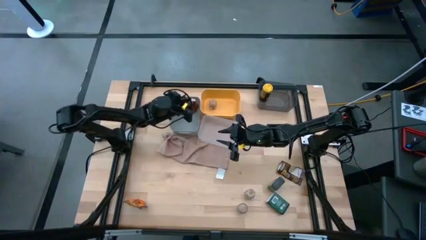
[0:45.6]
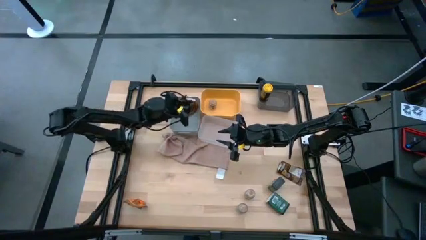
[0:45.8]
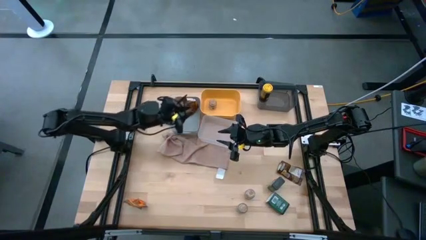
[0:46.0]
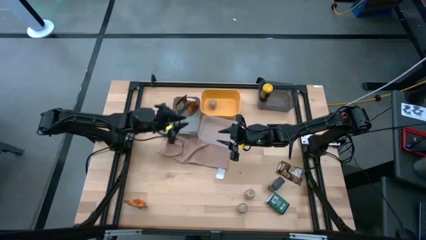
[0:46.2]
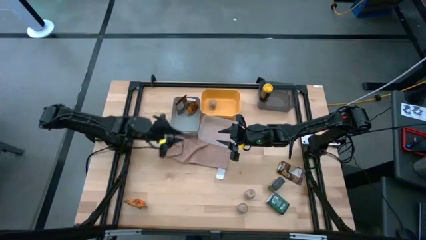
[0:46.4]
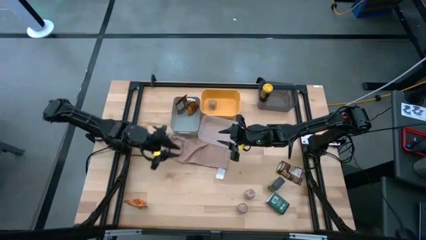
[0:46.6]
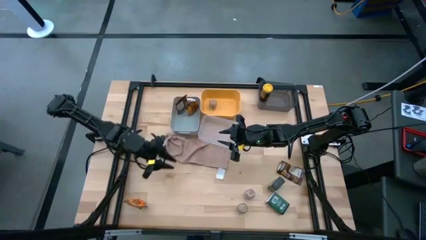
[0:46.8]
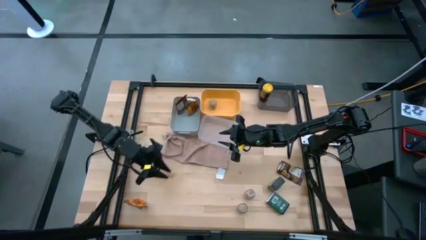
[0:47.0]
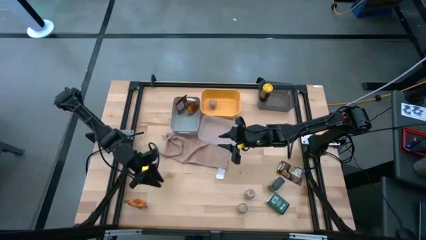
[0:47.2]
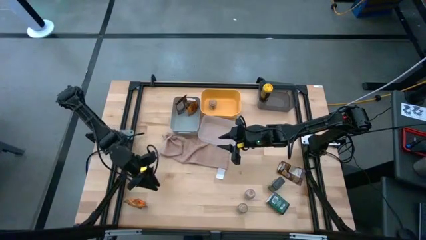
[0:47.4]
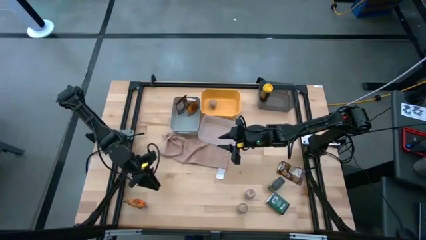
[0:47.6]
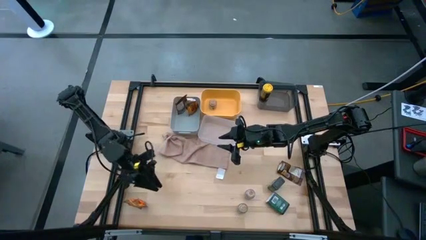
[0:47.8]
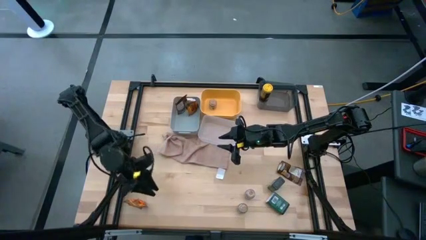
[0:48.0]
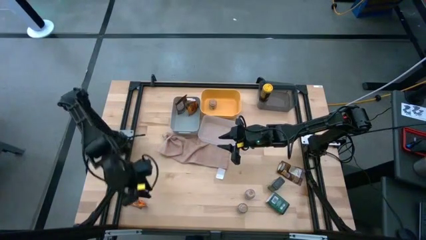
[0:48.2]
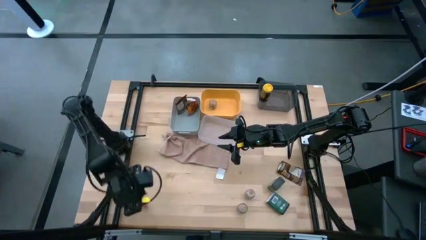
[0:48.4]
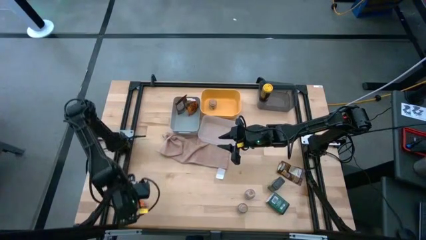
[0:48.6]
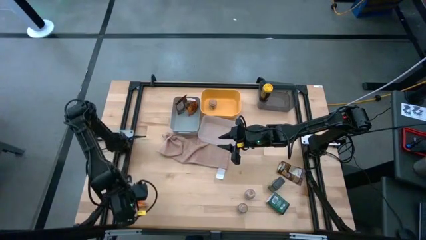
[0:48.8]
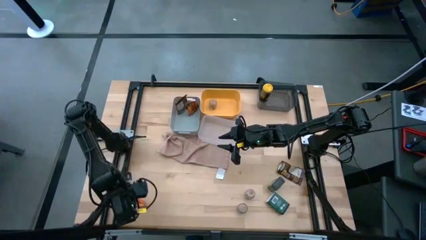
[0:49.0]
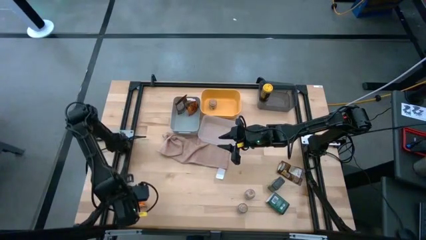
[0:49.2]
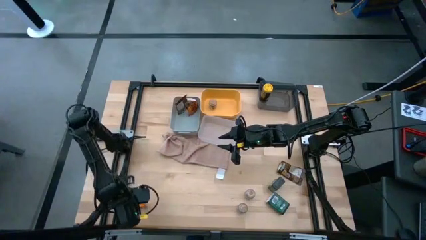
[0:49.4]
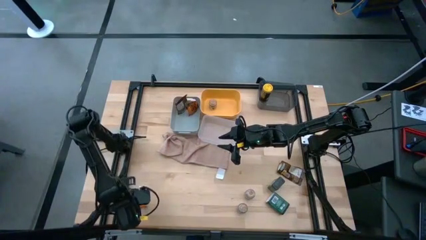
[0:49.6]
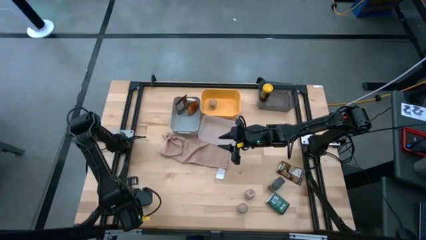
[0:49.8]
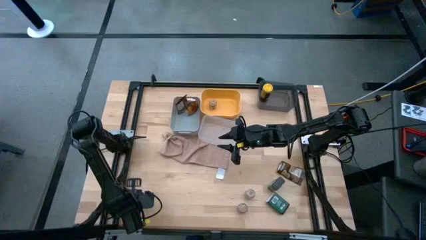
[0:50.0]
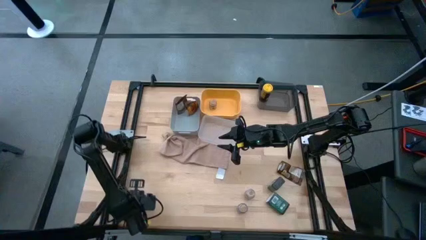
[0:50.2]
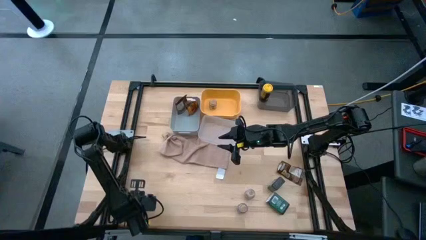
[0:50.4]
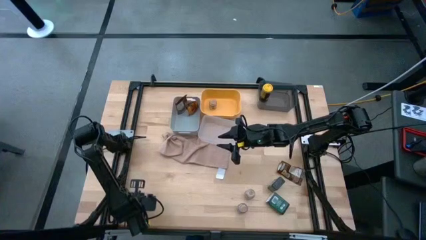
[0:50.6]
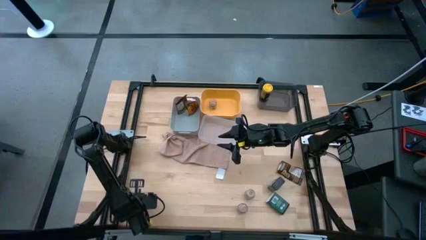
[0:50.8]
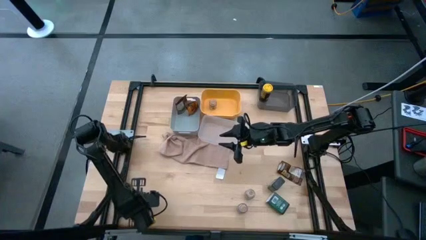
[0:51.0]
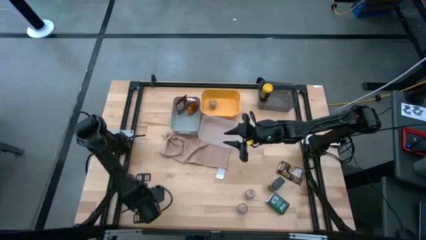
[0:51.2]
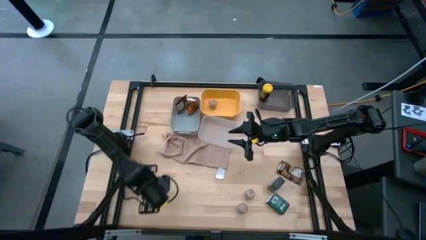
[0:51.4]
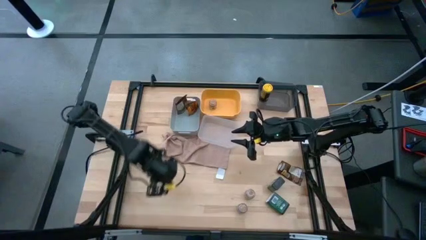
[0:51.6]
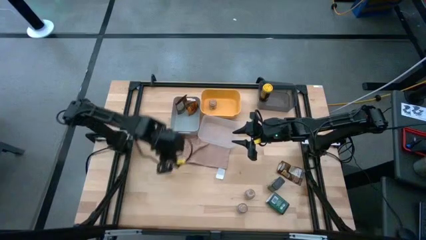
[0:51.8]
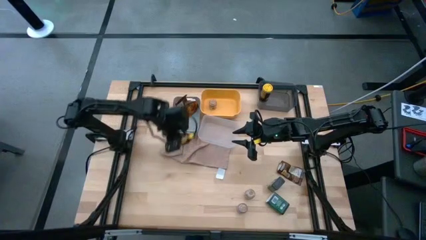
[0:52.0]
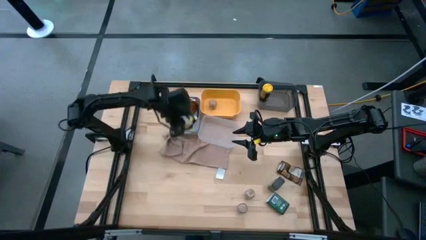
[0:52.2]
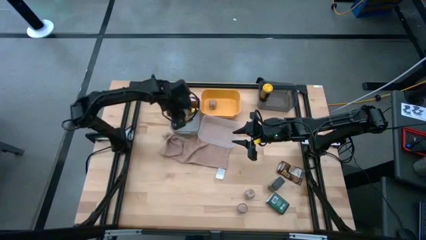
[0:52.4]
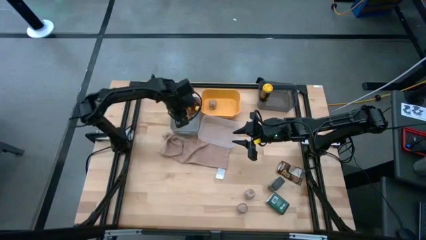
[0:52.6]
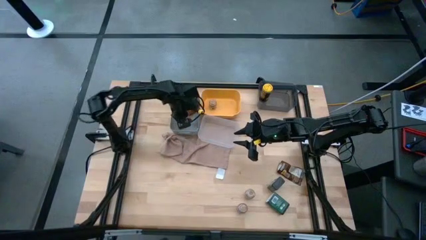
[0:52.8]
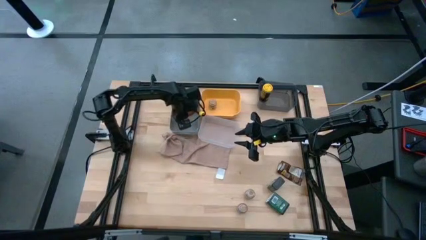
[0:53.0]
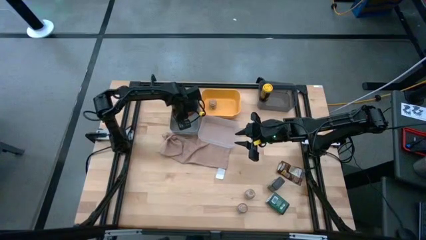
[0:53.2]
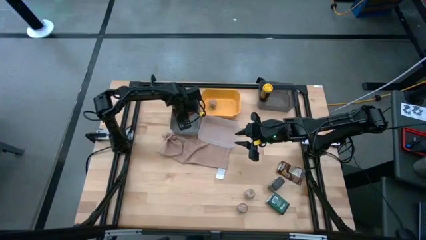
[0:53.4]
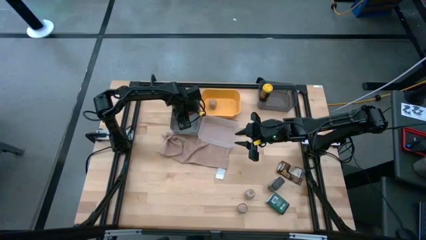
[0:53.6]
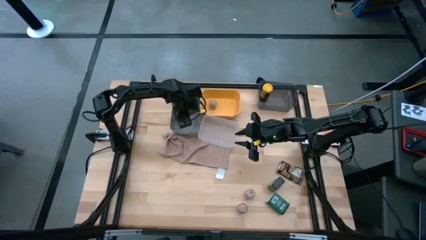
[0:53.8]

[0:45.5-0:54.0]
Task: Sort spices by type
Put the bottom orange seasoning pack into the gray bin

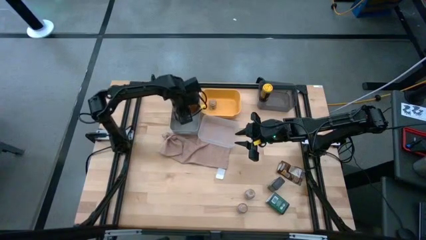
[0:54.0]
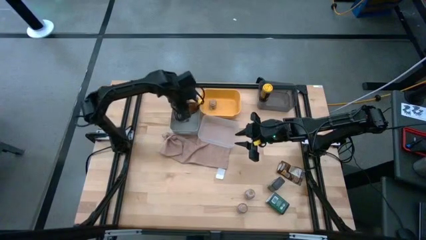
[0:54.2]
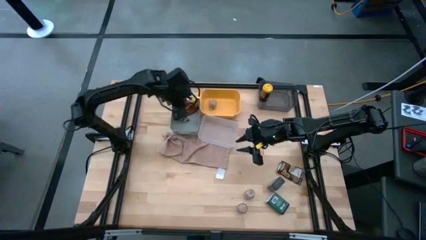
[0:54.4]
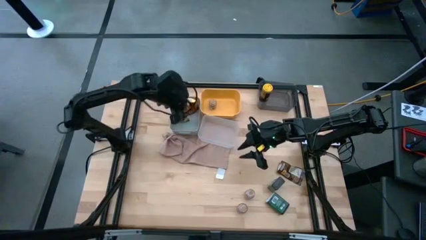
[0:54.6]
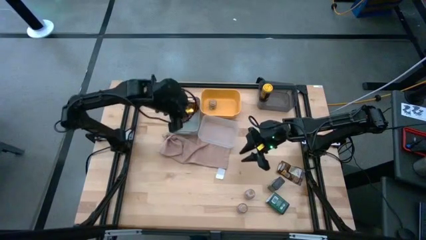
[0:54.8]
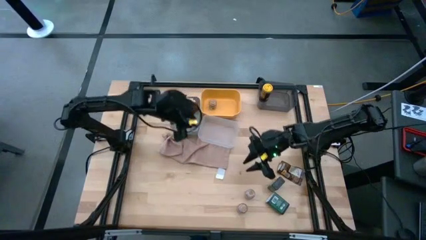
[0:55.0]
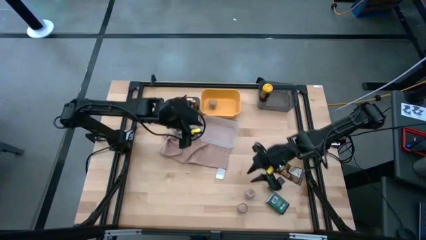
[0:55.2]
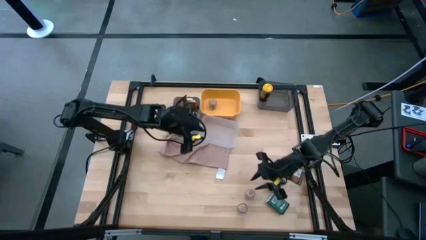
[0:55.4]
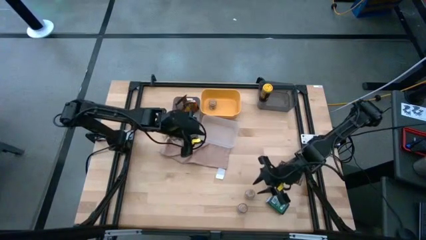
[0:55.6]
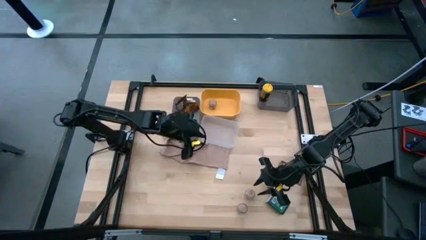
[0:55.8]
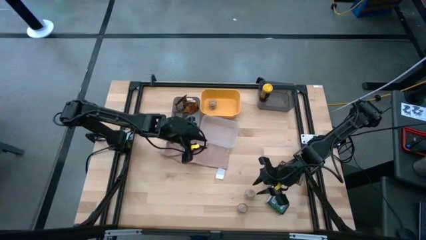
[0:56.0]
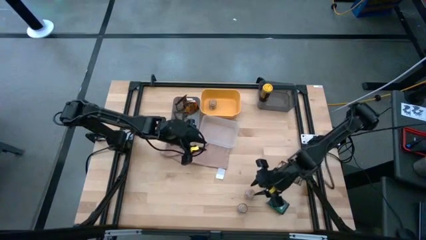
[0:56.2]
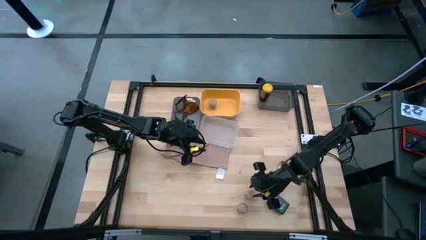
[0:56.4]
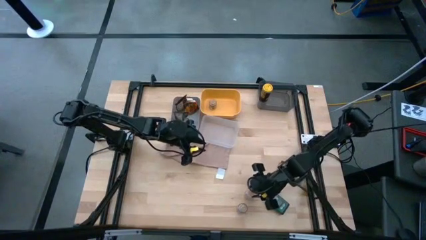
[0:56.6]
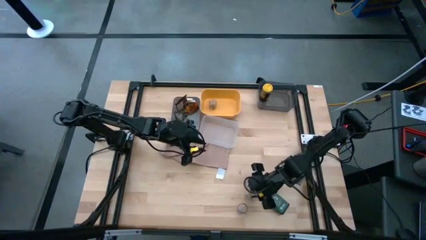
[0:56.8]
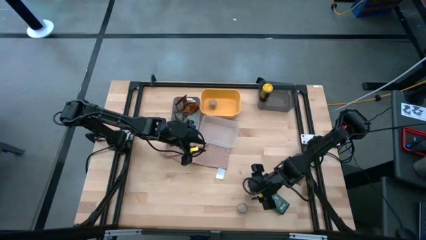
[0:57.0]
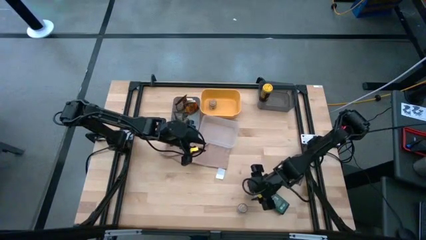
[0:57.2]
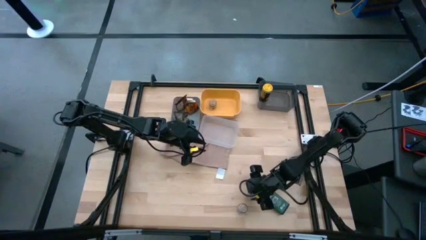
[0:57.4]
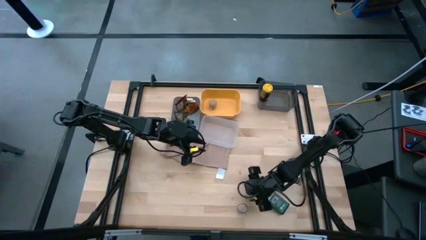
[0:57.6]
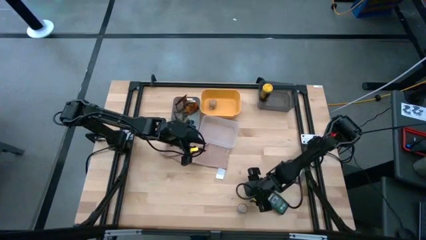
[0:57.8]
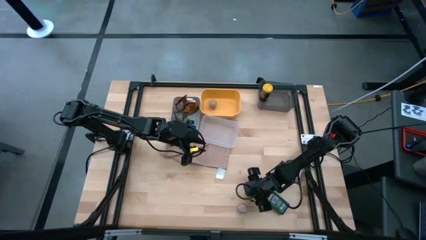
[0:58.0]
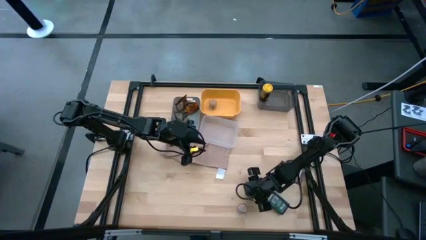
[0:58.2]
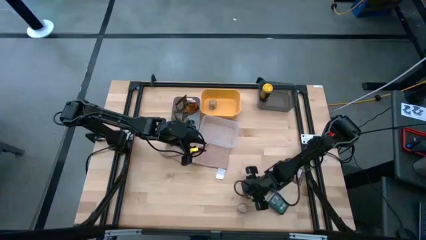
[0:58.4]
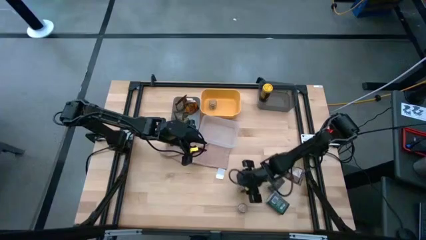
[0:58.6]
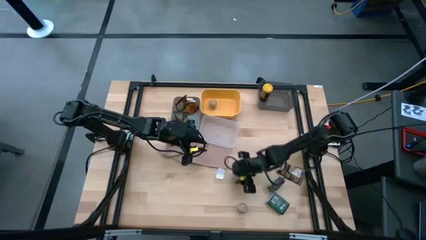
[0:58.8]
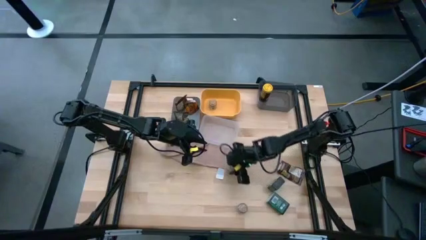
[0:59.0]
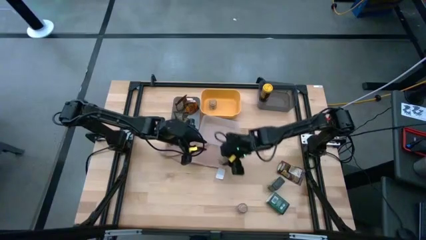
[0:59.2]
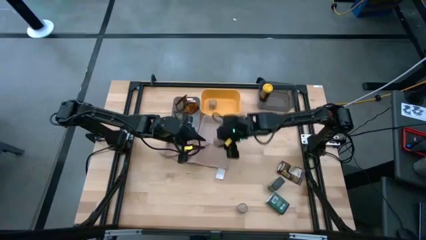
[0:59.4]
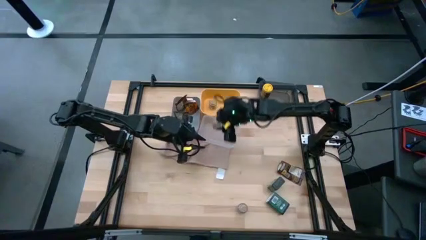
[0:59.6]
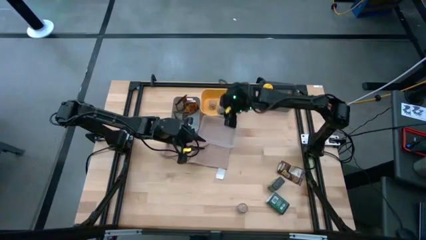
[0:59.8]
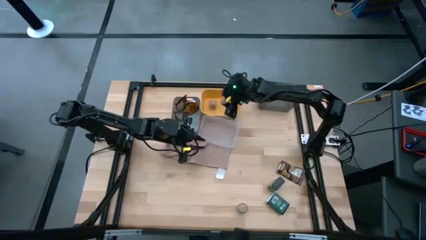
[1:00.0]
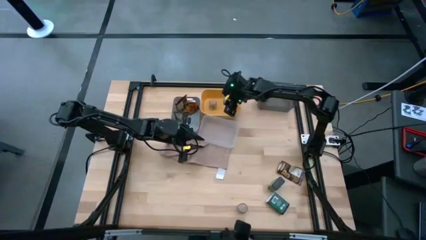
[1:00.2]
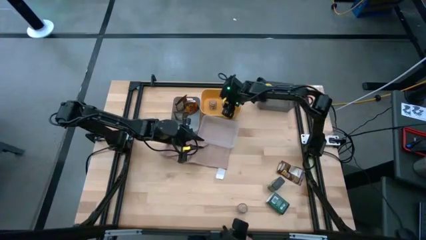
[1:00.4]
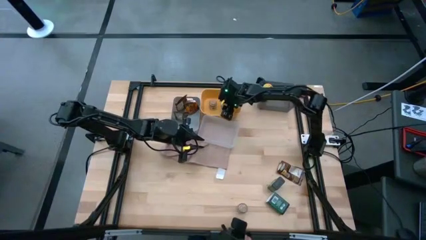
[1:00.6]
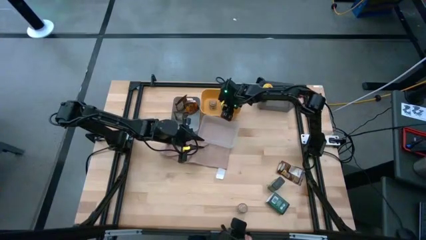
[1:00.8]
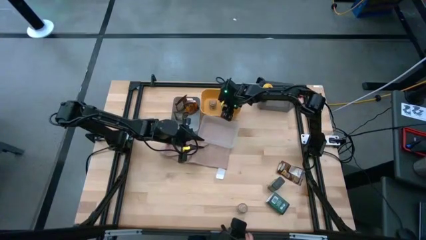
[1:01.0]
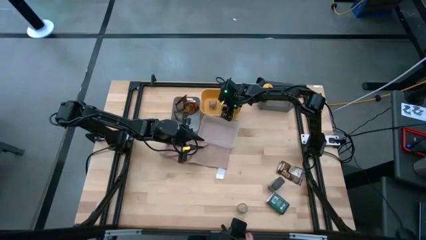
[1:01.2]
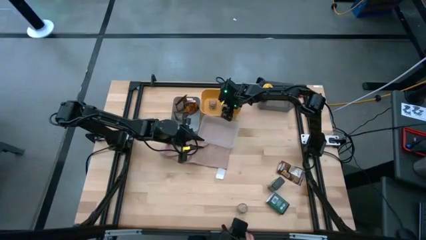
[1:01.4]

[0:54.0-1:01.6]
Put the right brown seasoning bottle into the yellow bin

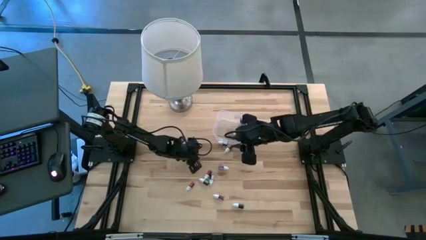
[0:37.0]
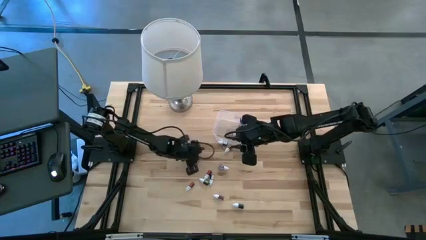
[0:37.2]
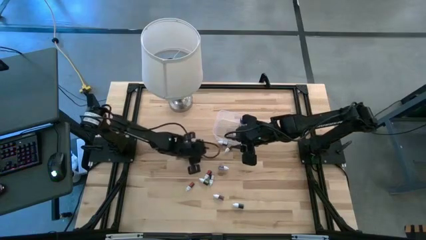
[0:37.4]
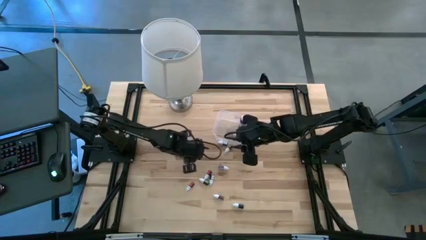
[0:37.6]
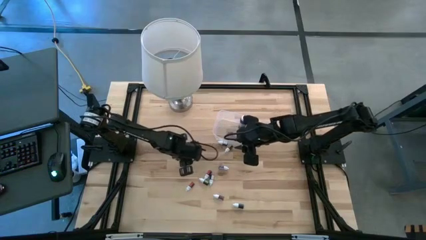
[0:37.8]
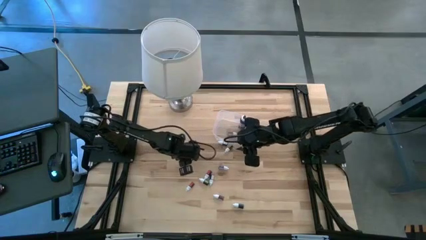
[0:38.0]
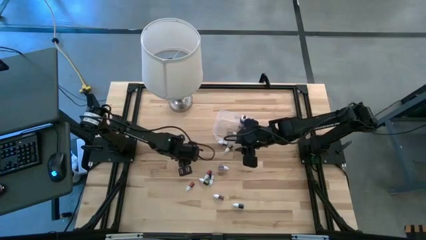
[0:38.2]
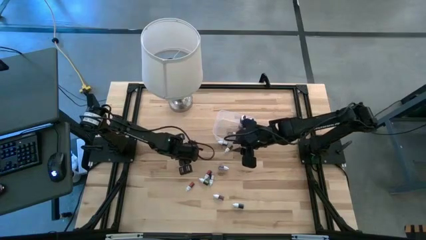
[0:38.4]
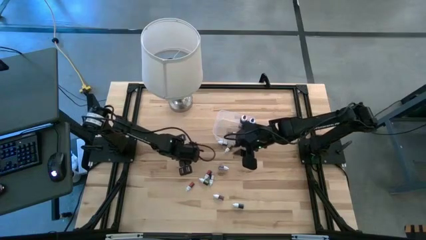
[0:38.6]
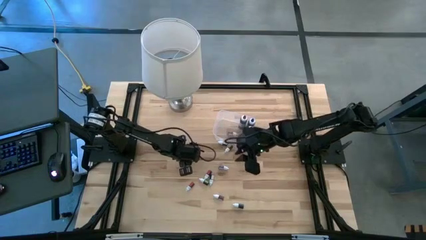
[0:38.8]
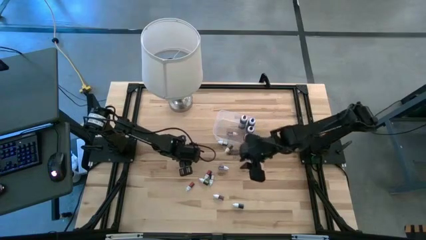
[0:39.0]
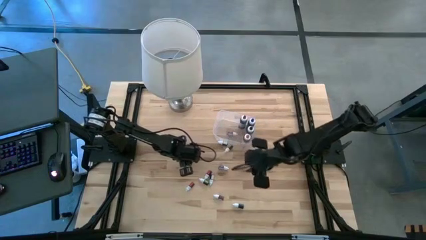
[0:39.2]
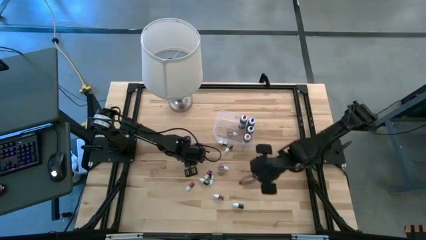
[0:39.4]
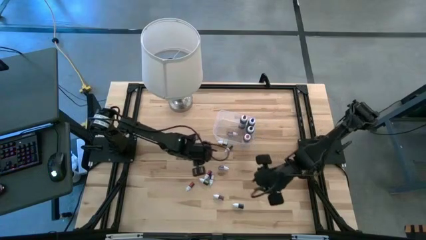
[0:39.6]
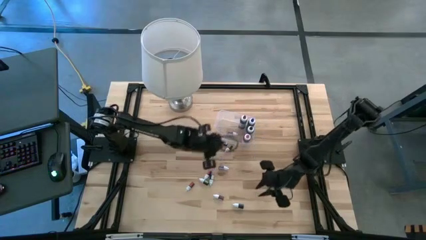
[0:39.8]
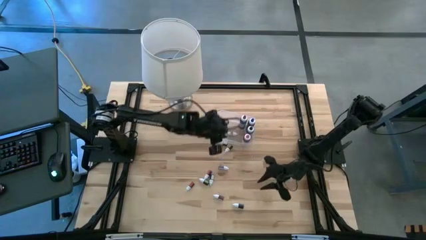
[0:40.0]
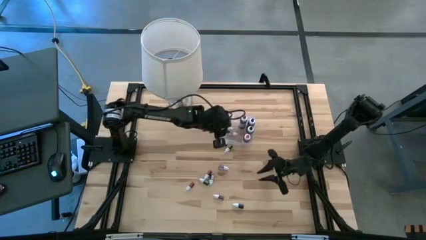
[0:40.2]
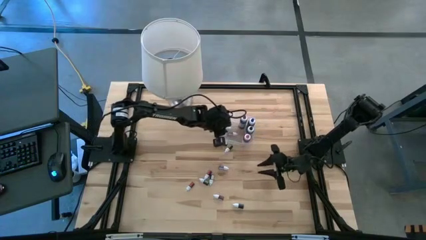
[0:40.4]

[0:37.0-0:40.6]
Task: Pick & Place food coloring
Put the left small blue food coloring bottle into the transparent bin
